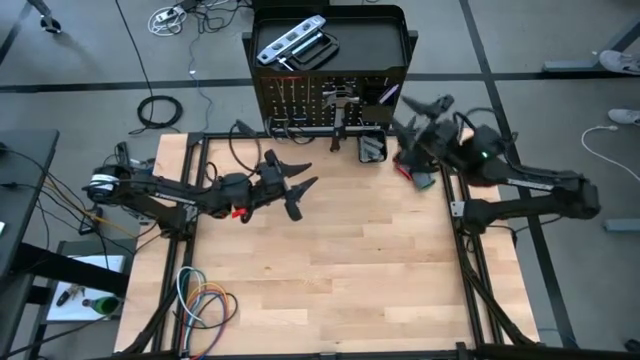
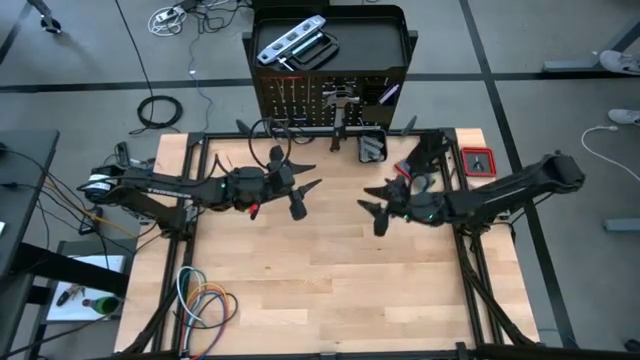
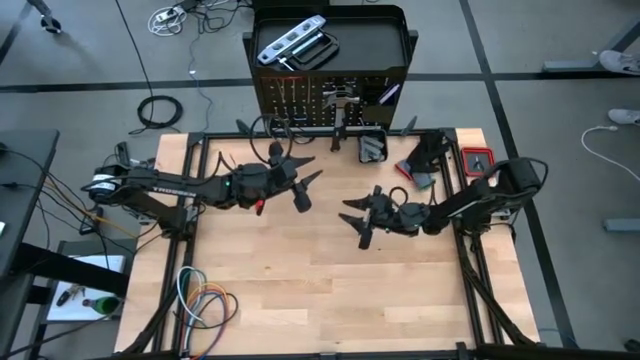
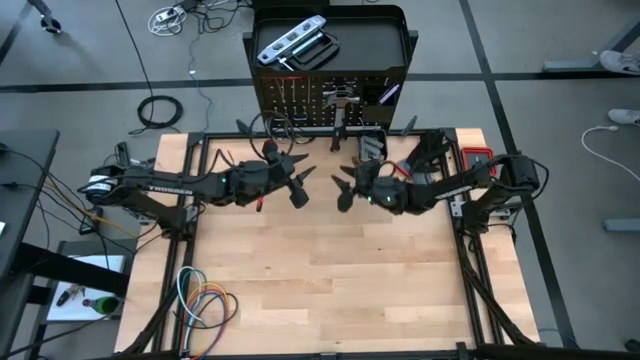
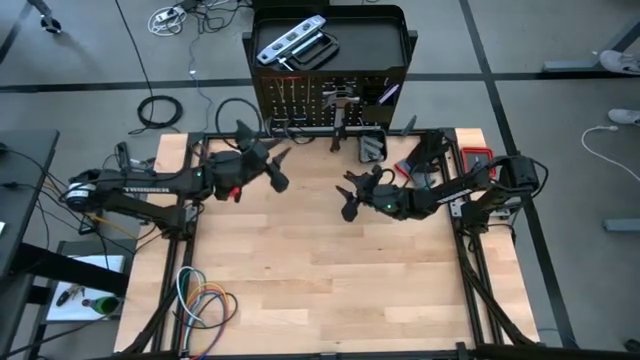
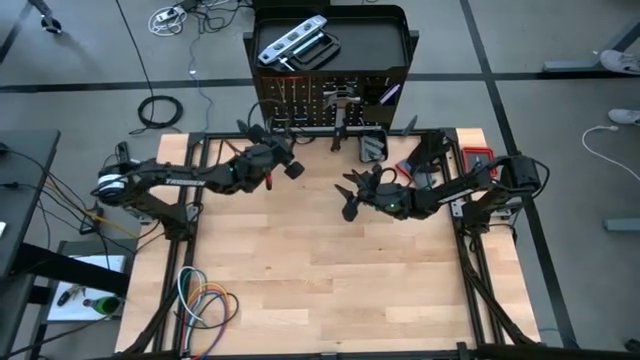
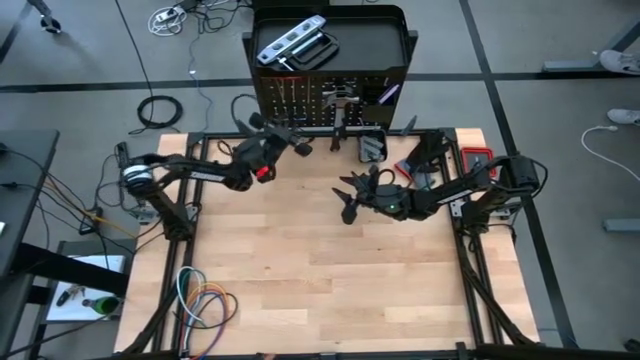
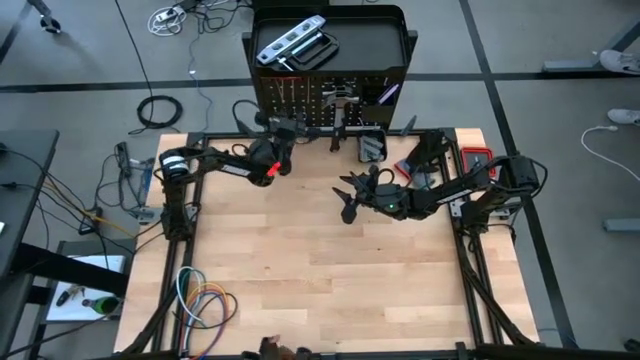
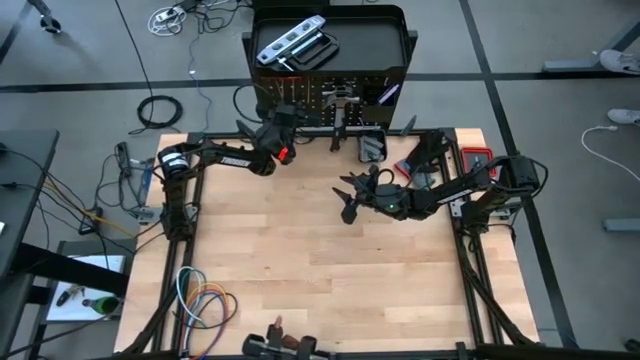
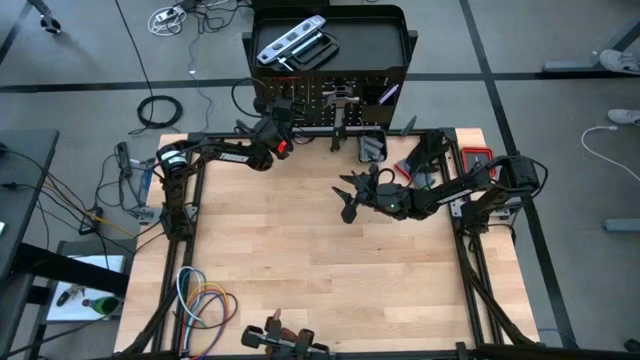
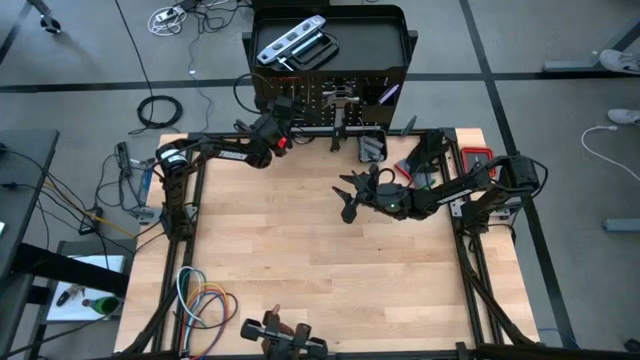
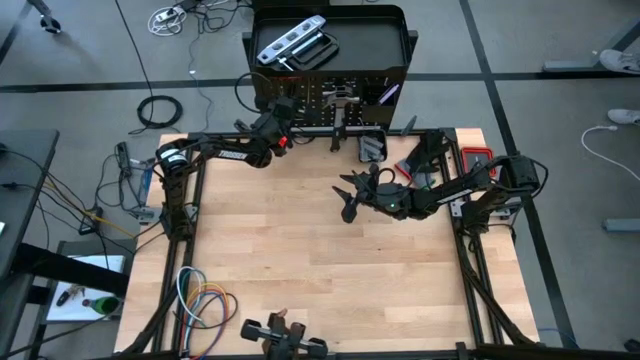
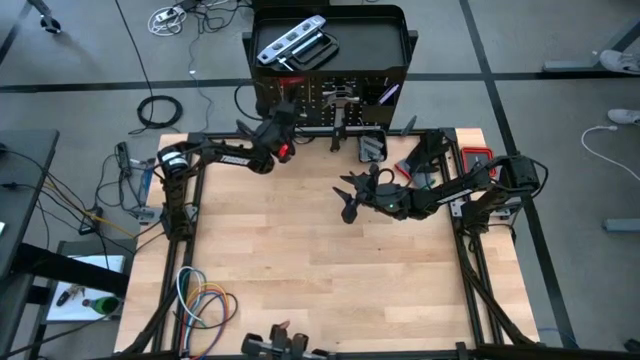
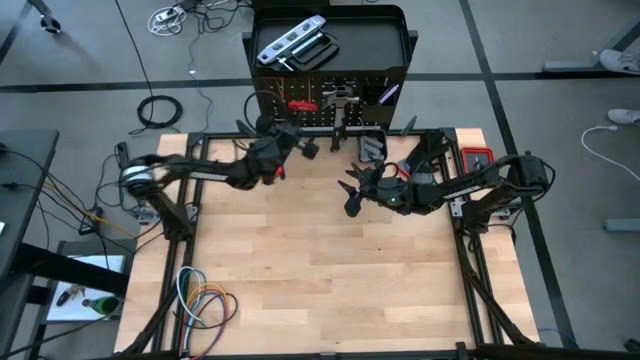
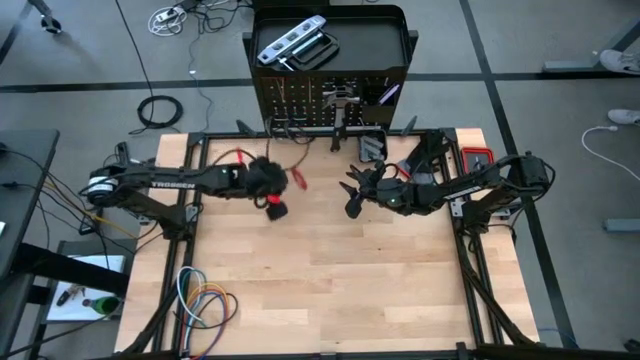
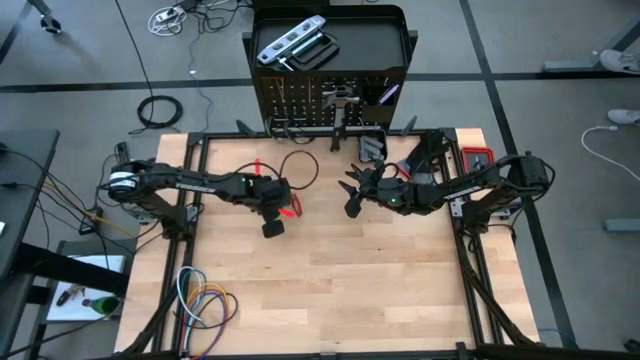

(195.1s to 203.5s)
Task: Hang tools onto peg board
Remove the allen wrench from the peg board

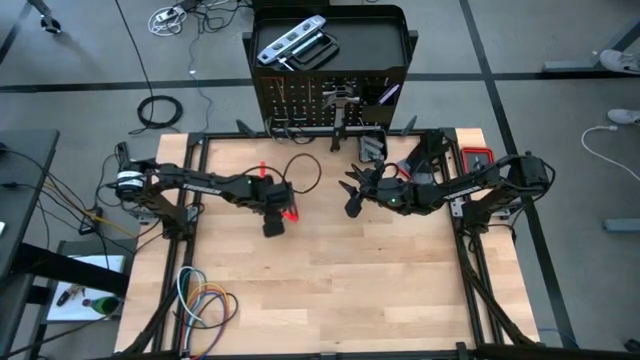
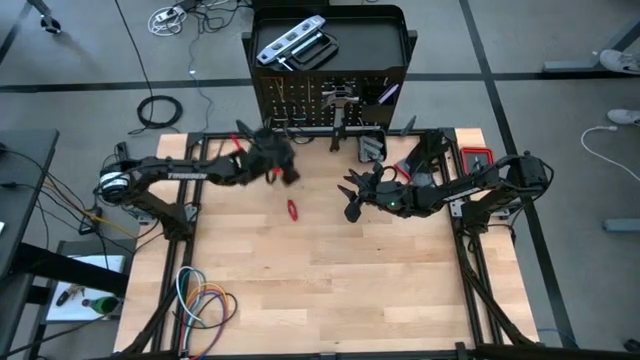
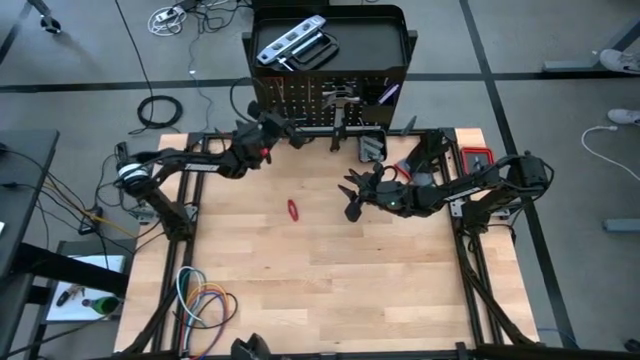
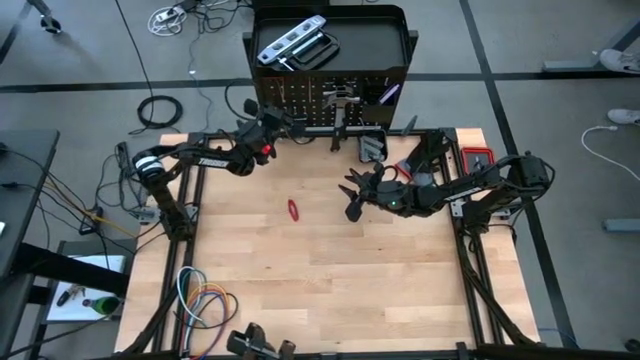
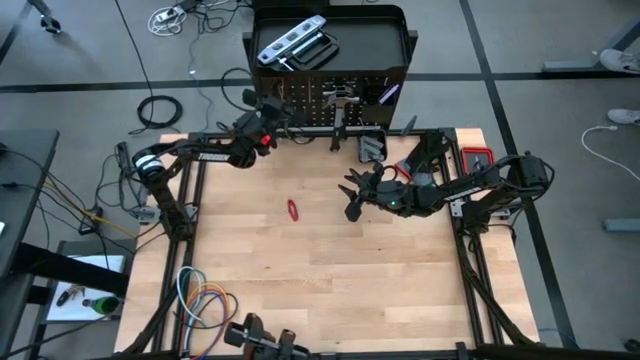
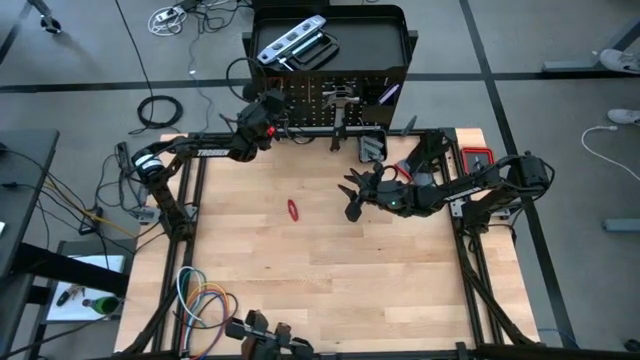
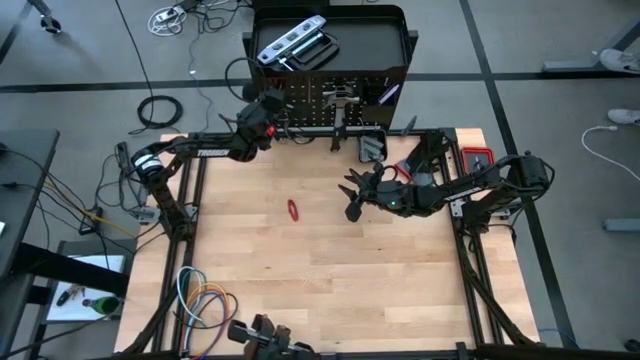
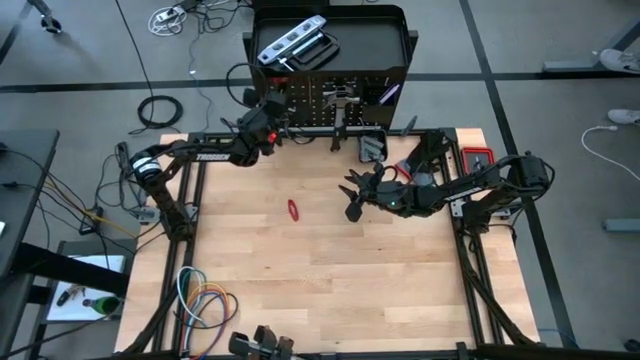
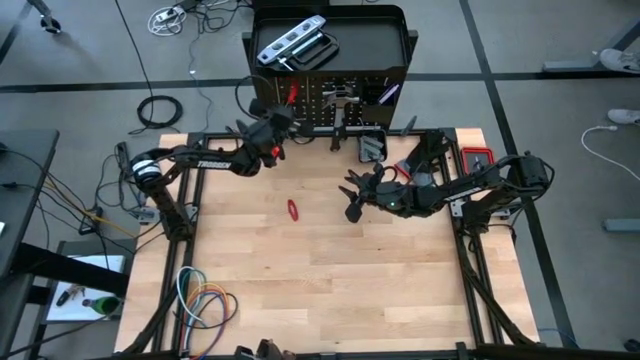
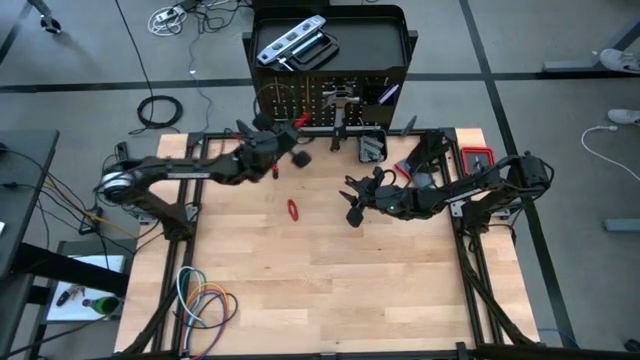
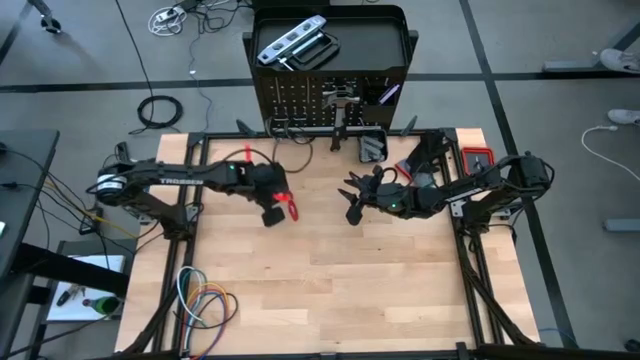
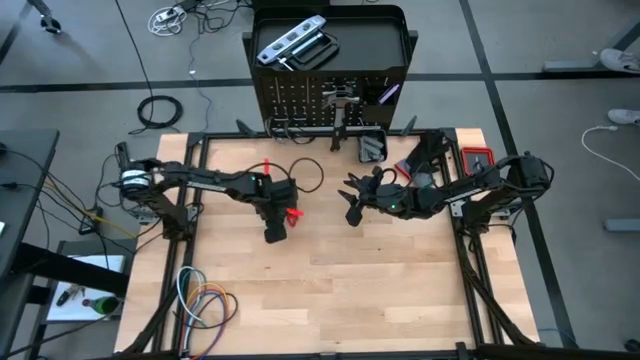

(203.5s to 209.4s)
Remove the middle allen wrench from the peg board

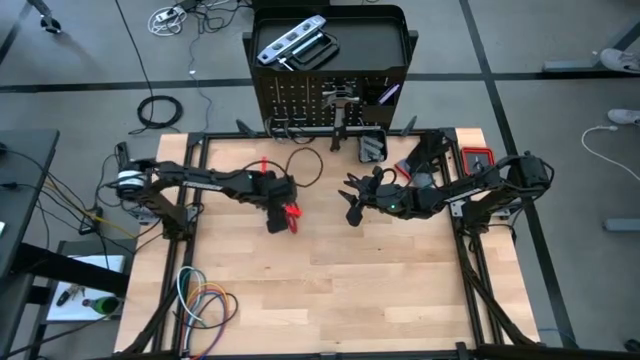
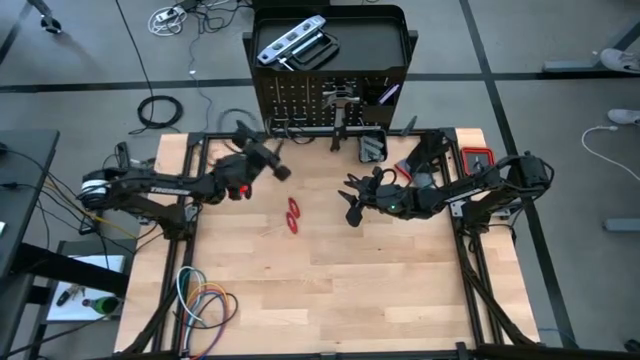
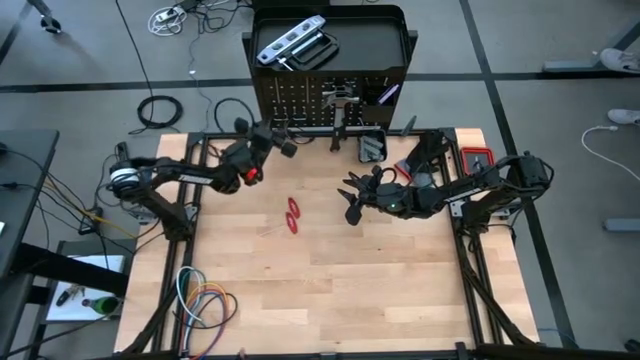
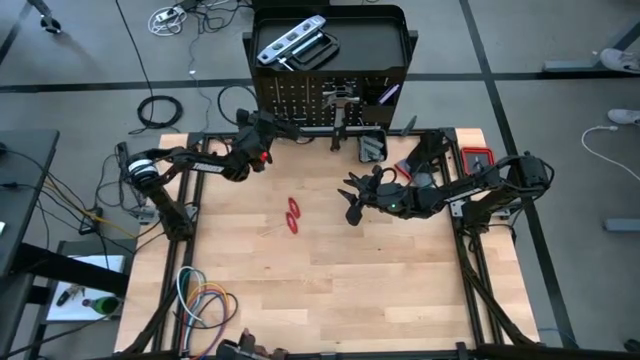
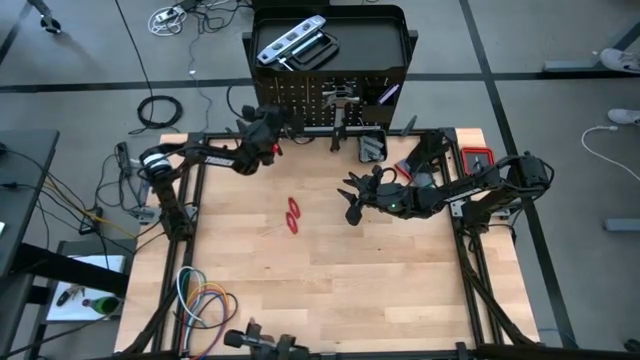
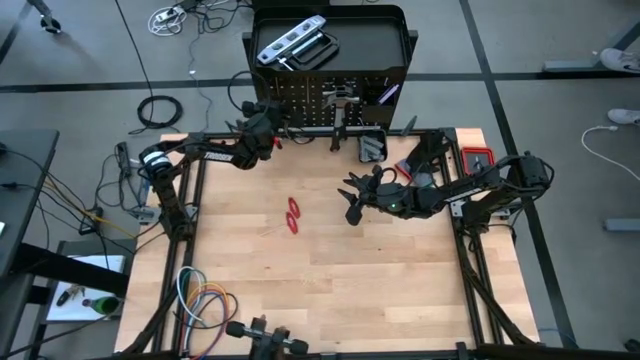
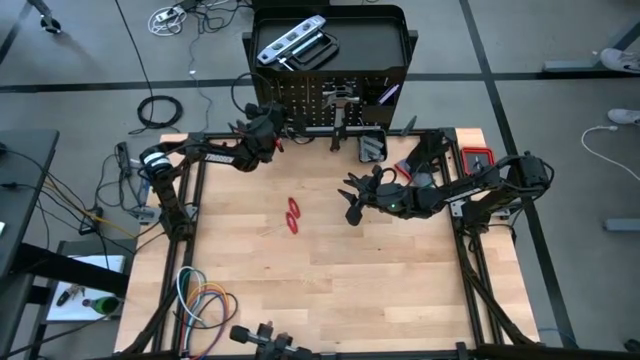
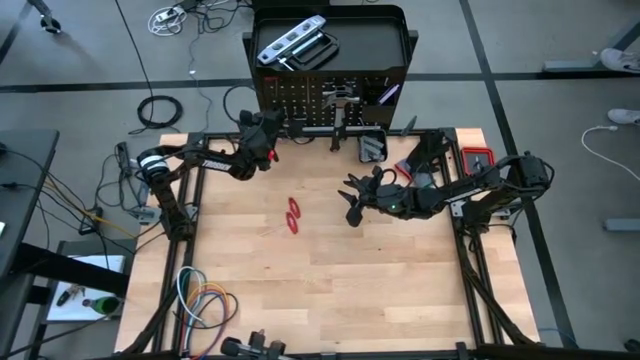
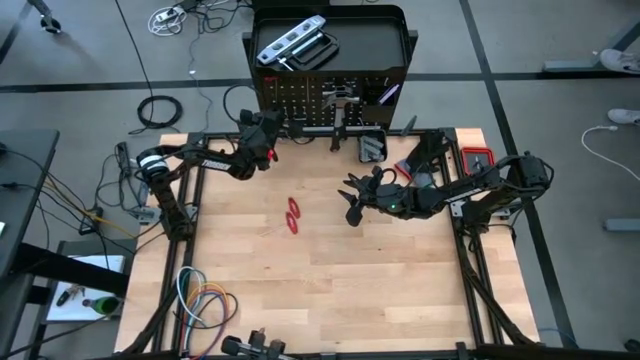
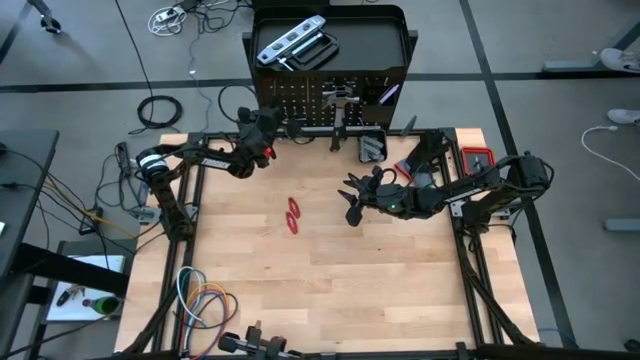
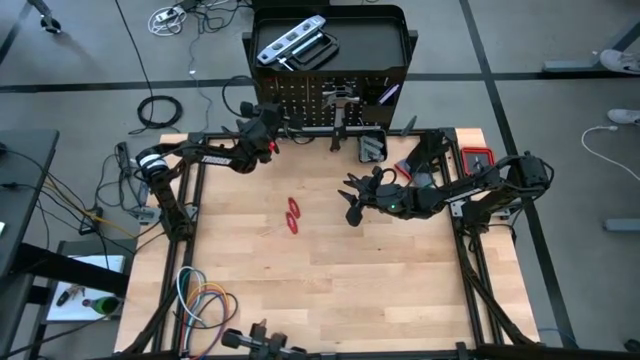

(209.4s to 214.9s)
Remove the left allen wrench from the peg board

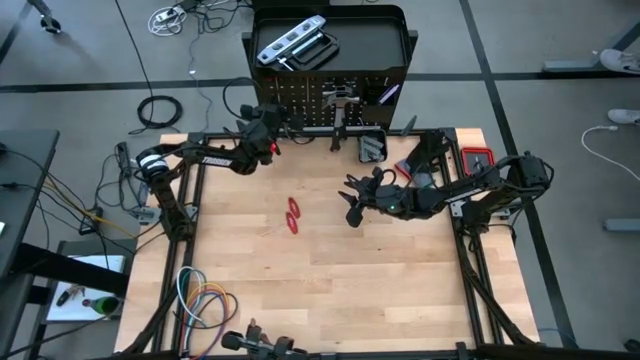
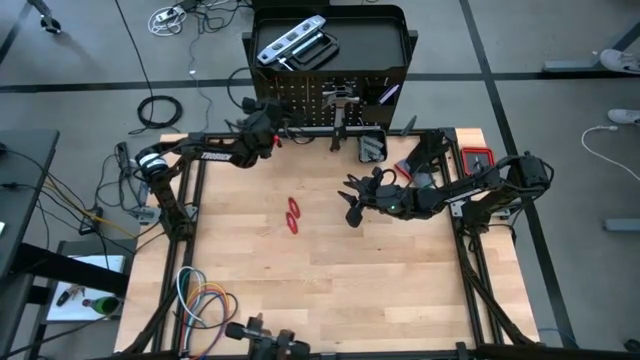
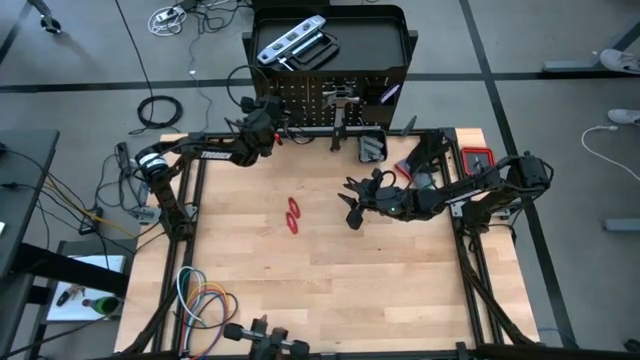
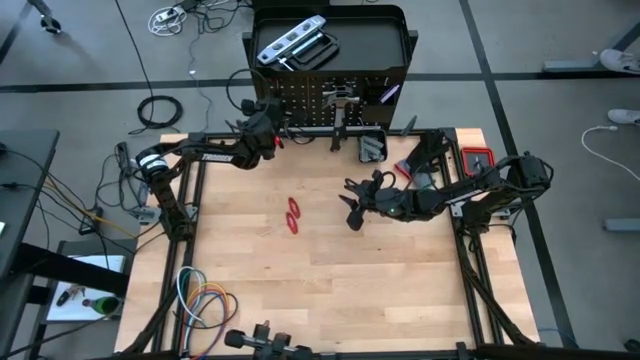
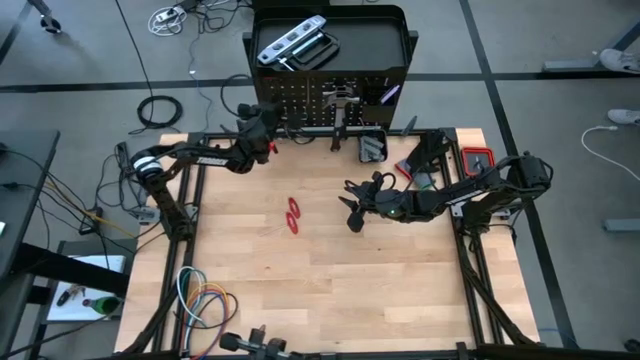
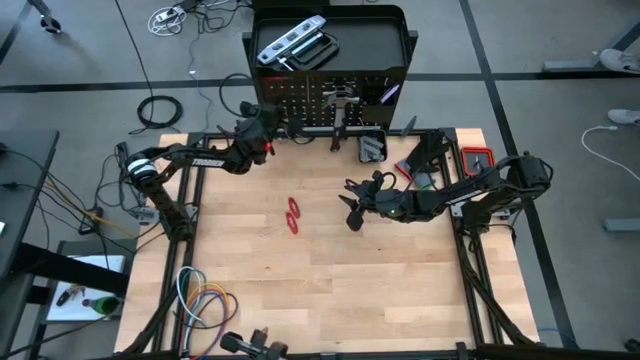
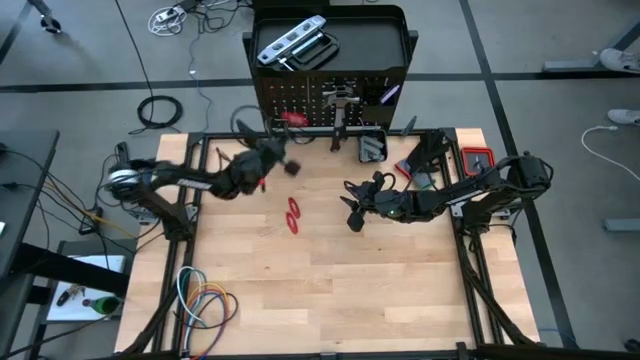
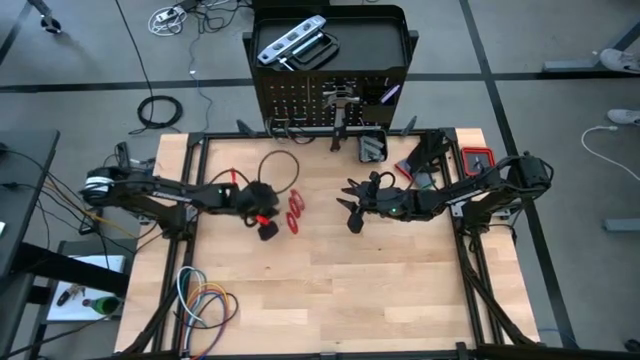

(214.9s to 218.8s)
Remove the left allen wrench from the peg board
